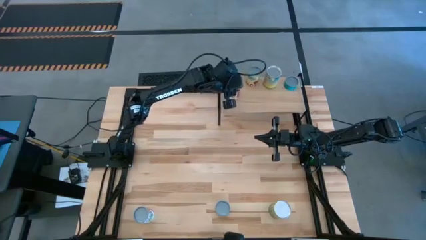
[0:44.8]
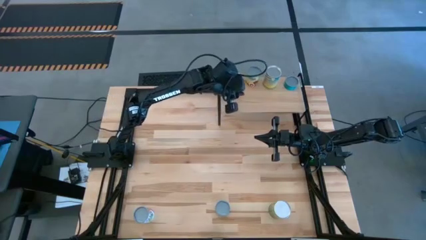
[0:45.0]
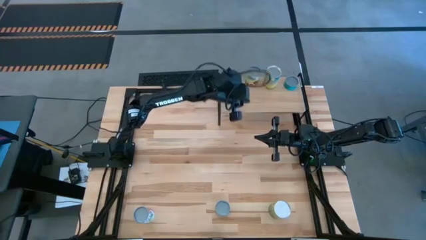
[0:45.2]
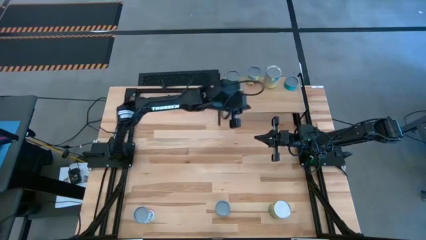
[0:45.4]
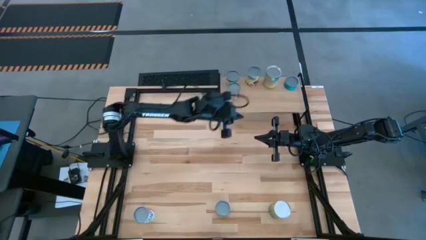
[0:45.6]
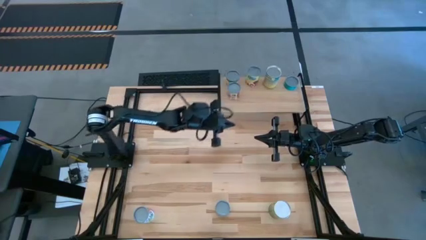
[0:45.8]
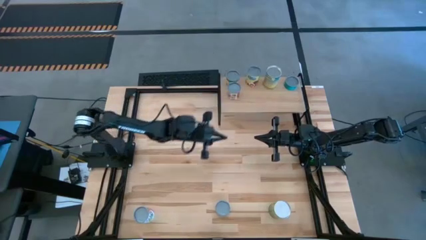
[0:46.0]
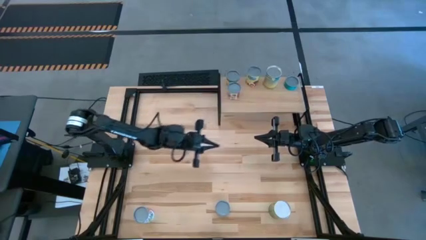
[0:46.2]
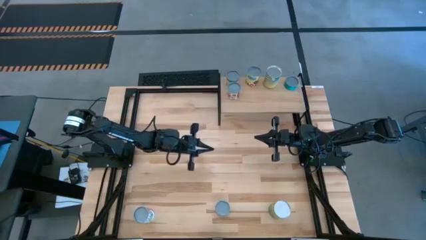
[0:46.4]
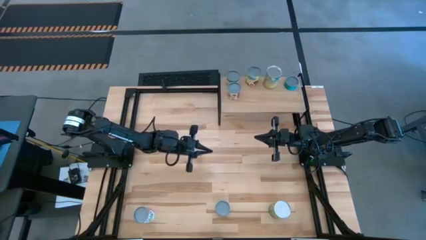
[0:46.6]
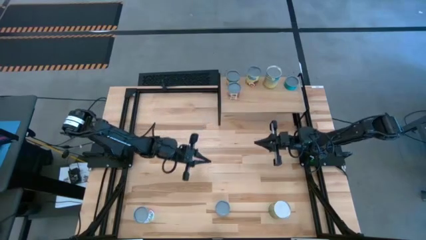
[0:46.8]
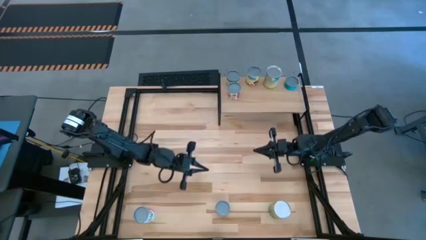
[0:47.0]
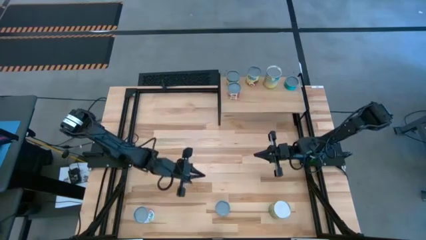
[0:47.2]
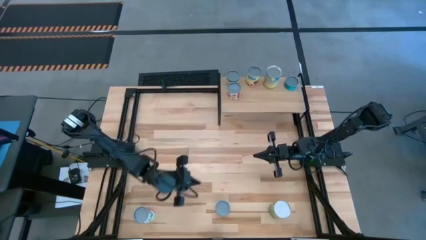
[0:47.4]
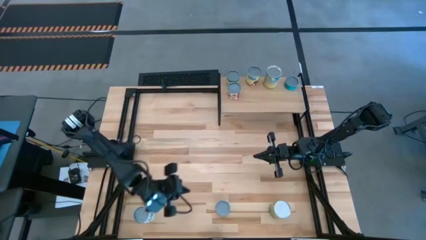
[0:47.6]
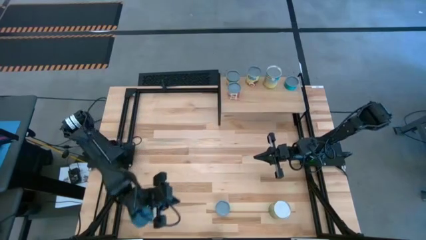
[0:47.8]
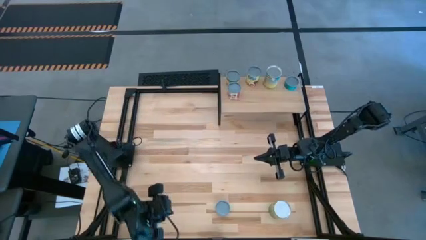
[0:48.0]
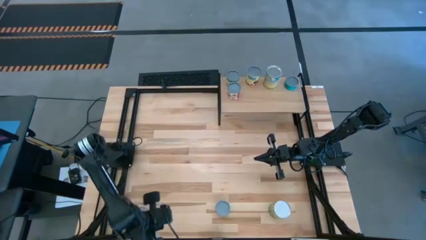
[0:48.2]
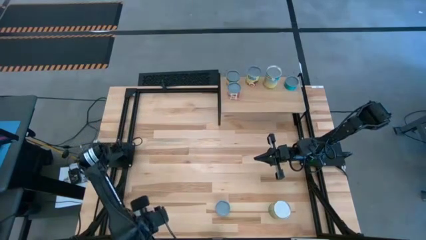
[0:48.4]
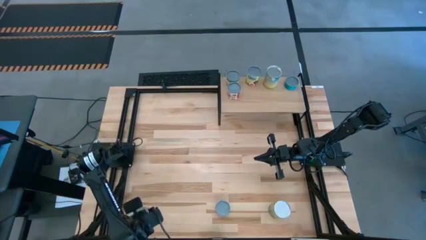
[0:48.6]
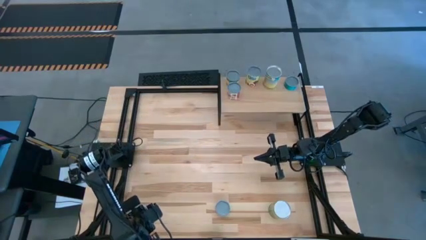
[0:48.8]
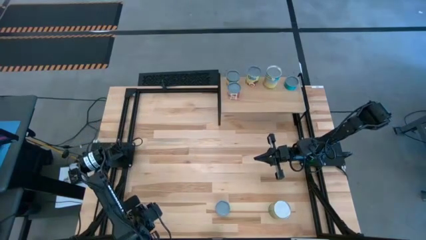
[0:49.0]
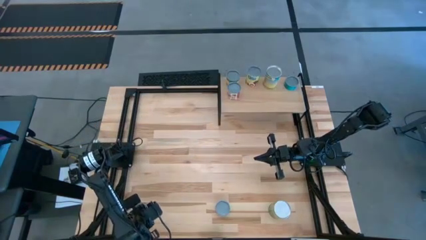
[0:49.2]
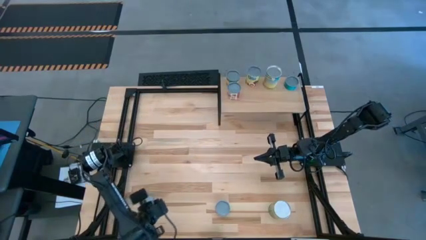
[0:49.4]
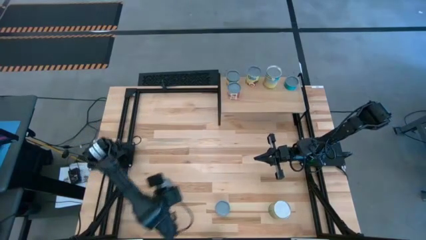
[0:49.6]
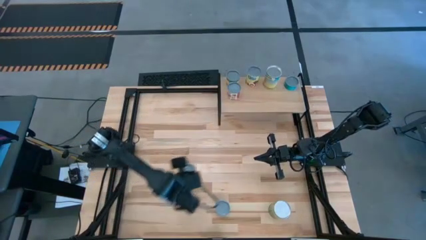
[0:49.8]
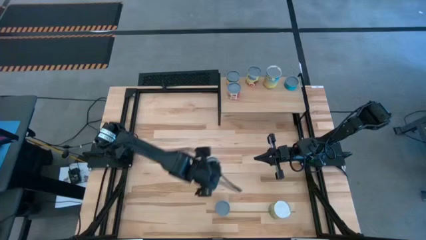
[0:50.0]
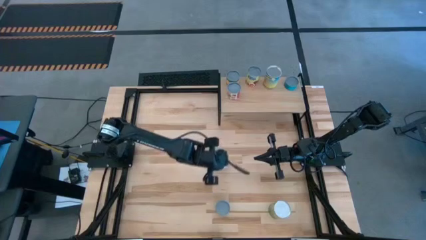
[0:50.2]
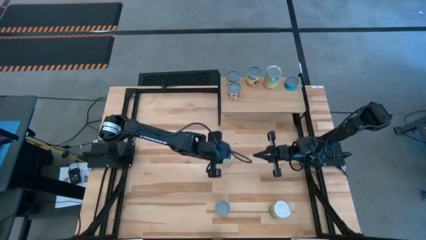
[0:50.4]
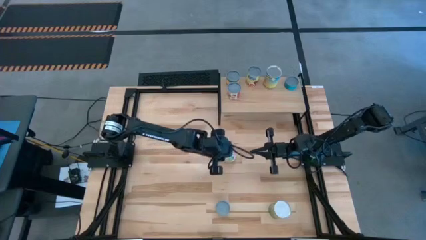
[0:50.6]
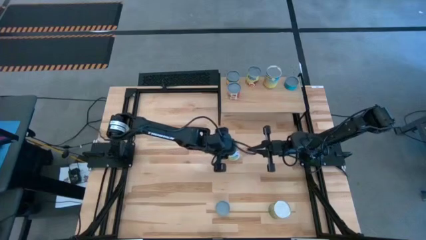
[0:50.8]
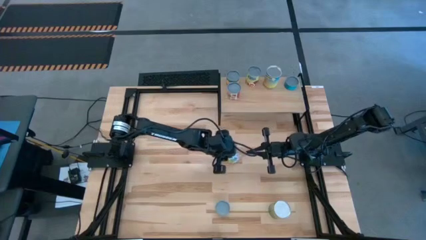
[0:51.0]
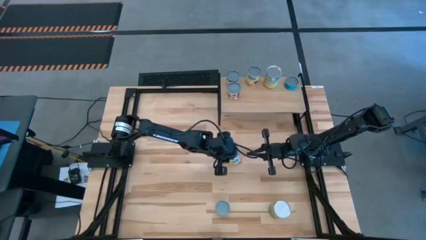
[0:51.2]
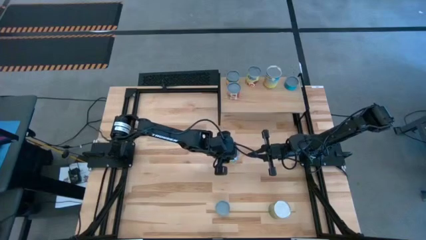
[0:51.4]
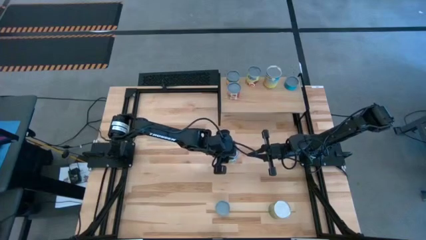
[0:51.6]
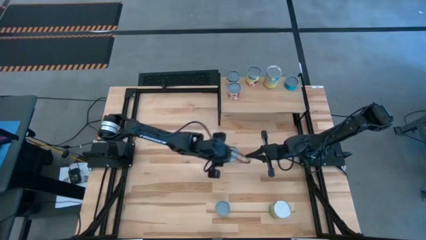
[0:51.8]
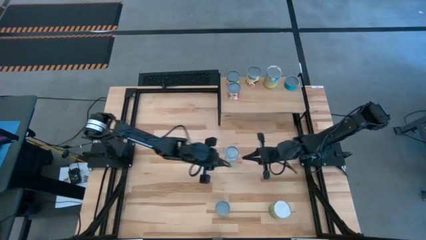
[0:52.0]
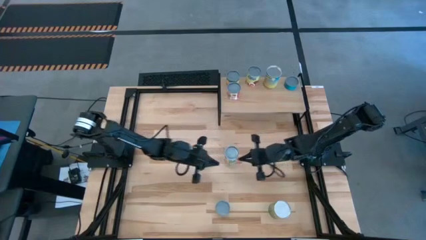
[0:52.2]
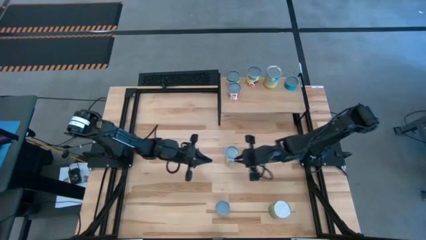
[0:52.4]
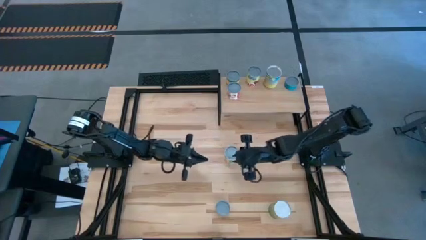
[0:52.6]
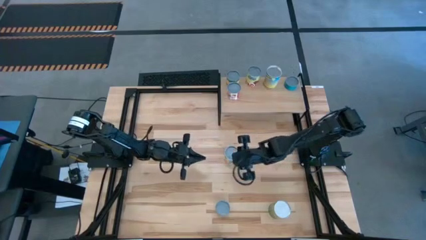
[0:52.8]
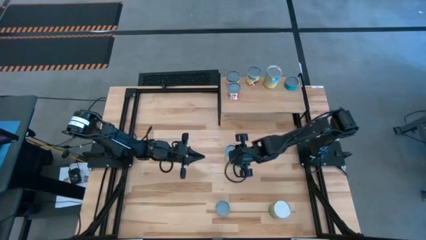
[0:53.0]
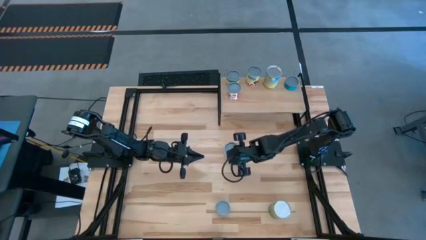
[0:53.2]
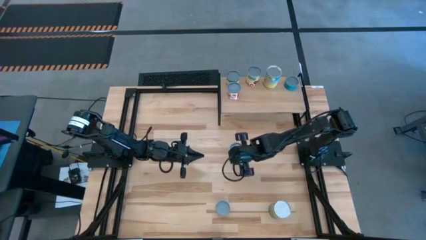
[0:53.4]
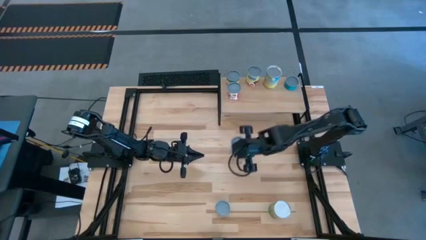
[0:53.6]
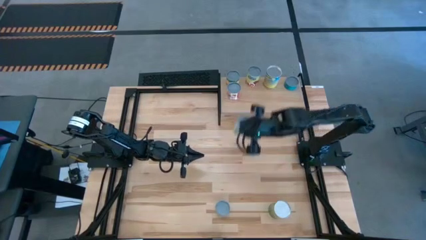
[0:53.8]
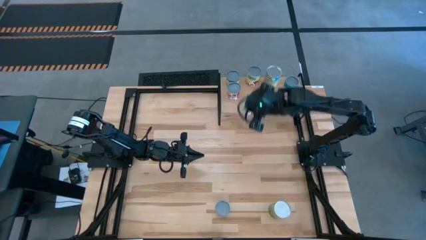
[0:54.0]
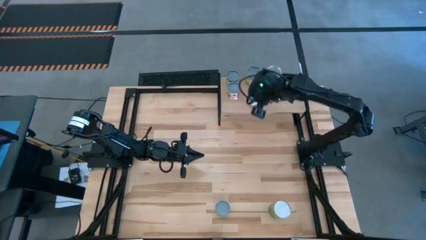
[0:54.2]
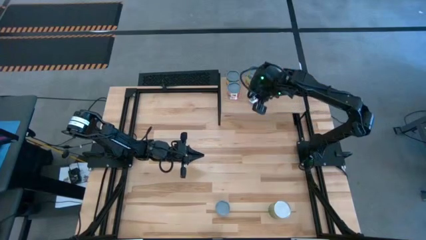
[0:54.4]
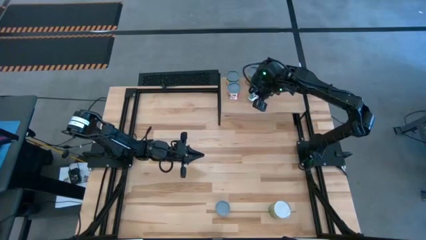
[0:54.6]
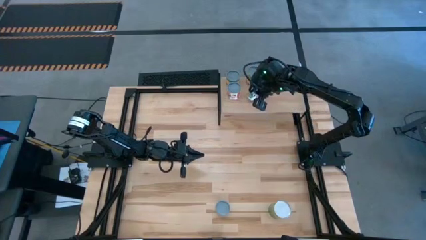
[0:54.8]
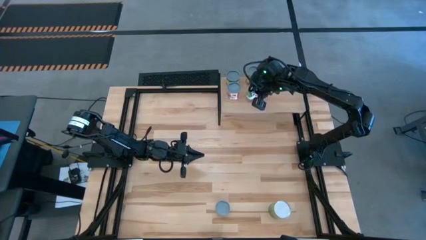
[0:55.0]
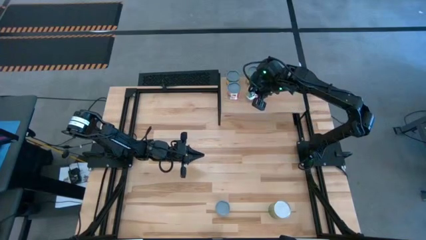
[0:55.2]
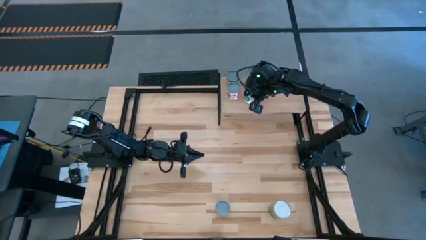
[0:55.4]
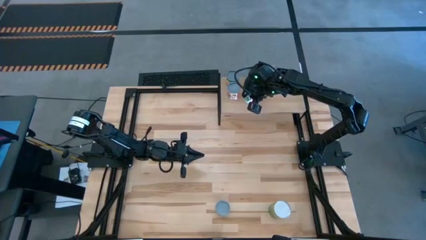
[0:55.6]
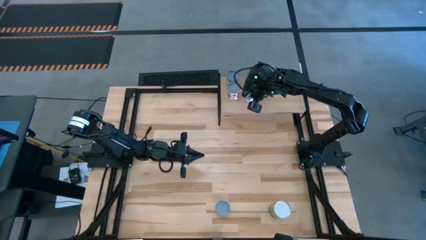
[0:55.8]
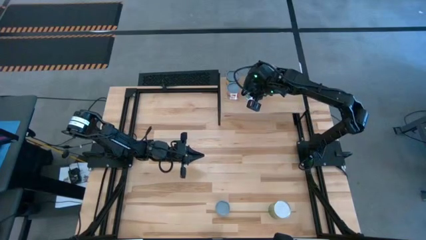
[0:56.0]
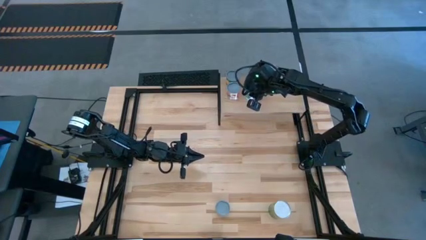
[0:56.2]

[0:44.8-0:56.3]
Task: Pick and place cans onto a shelf
Put the canned mixed fruits on the shelf

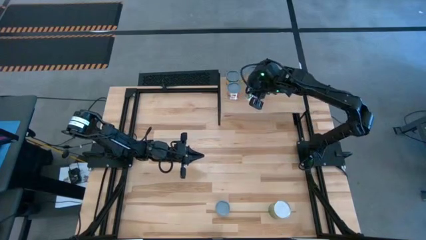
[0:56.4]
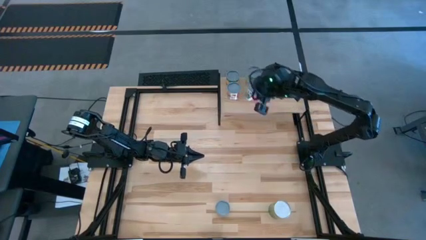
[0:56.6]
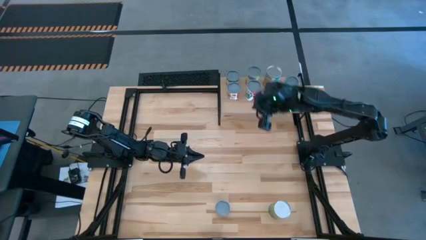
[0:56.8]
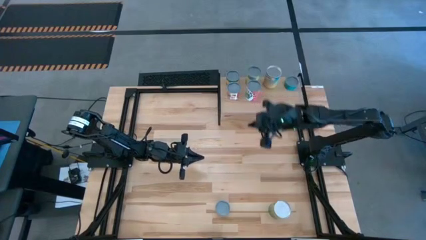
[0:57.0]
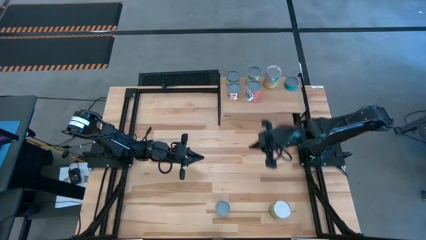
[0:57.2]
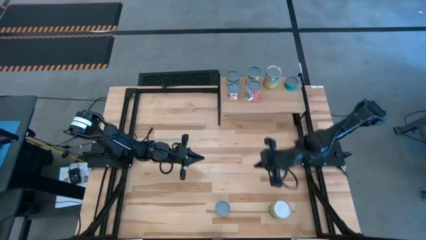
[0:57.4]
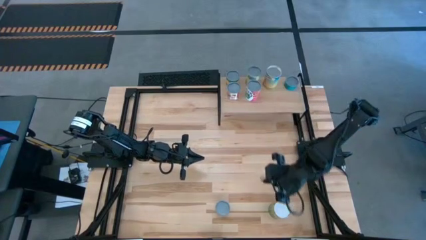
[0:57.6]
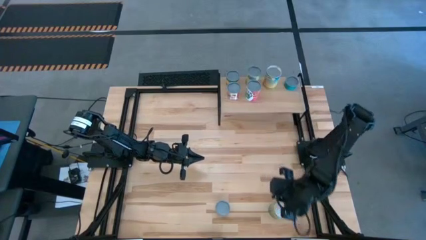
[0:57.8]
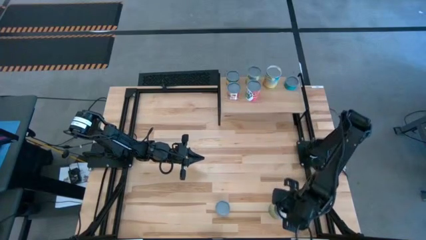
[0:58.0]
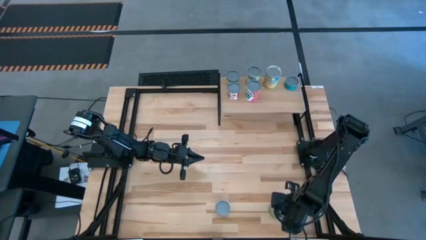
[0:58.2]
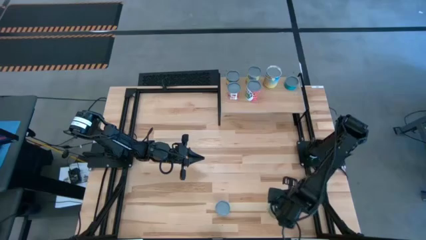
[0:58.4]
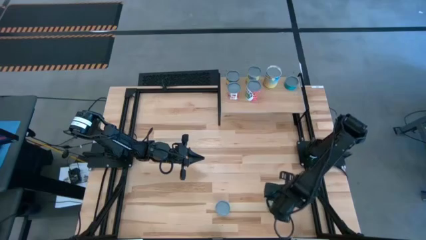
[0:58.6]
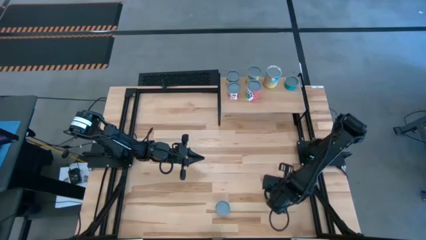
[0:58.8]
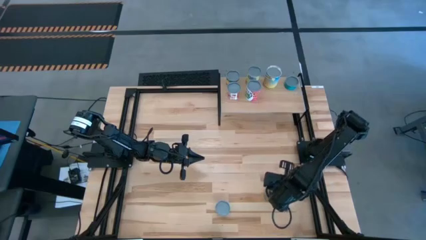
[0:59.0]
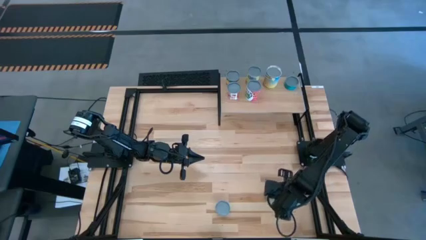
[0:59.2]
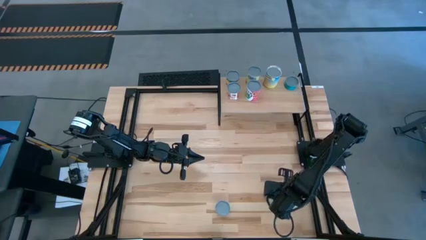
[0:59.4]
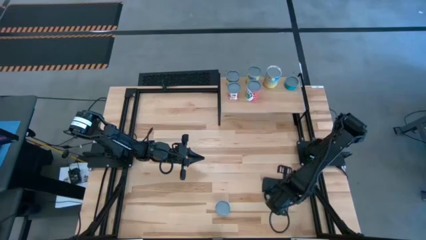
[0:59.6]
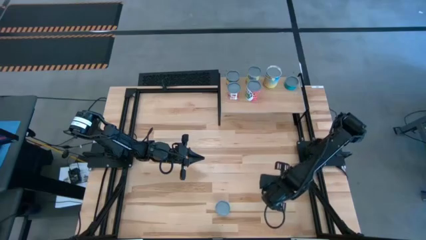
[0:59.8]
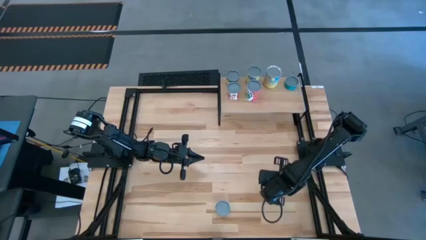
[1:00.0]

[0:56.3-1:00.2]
Put the large canned oranges on the shelf

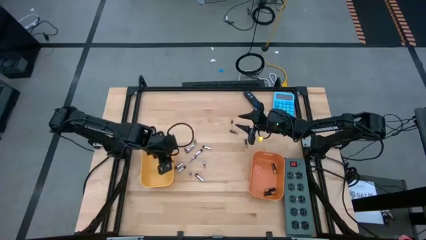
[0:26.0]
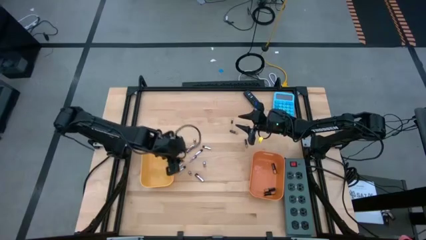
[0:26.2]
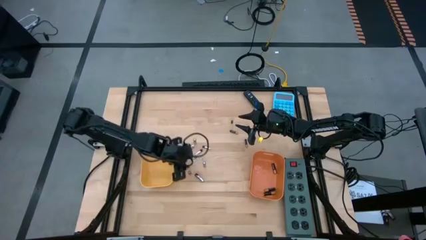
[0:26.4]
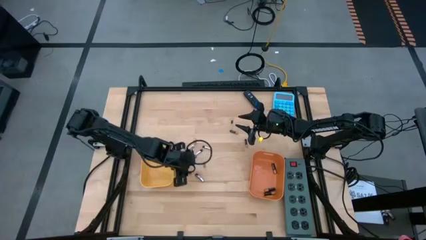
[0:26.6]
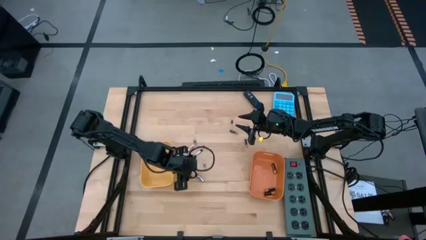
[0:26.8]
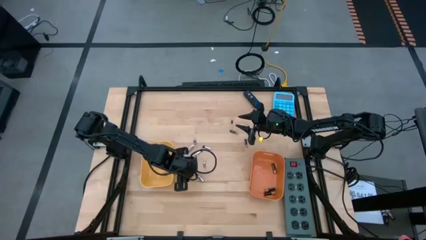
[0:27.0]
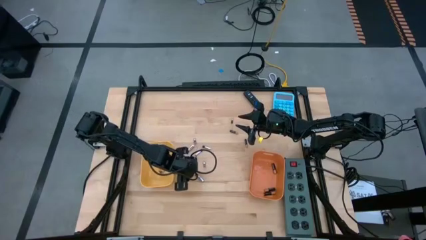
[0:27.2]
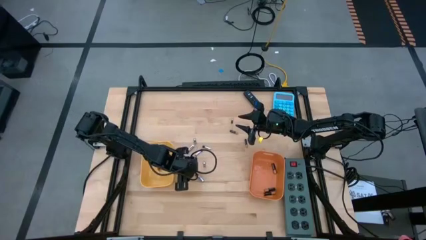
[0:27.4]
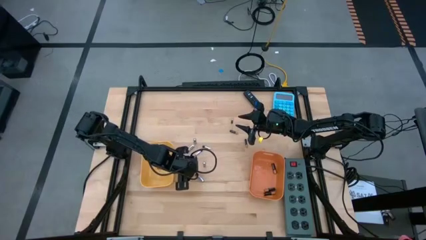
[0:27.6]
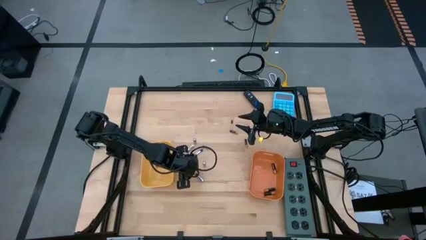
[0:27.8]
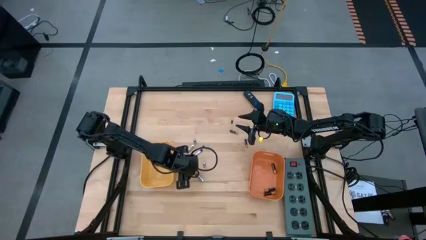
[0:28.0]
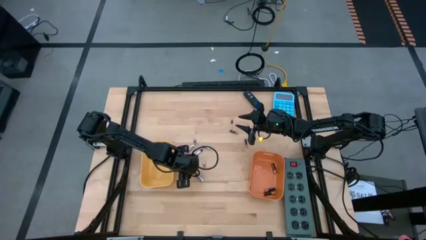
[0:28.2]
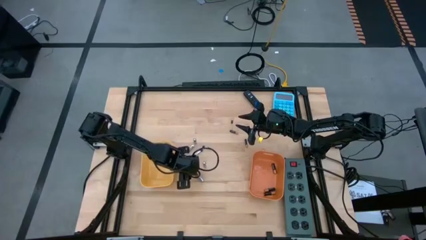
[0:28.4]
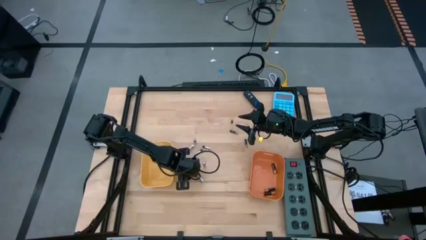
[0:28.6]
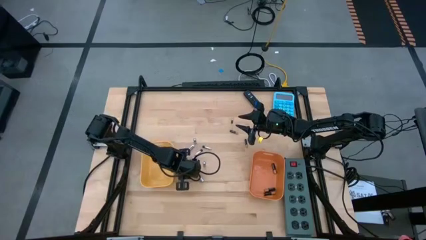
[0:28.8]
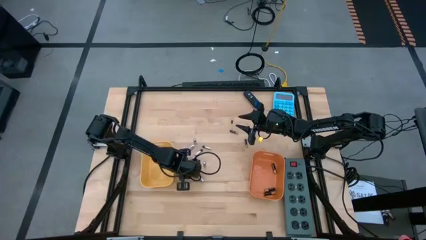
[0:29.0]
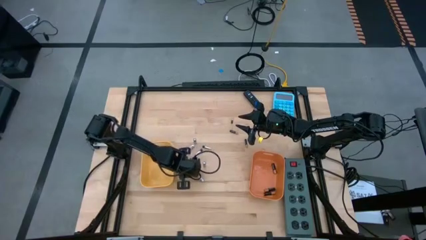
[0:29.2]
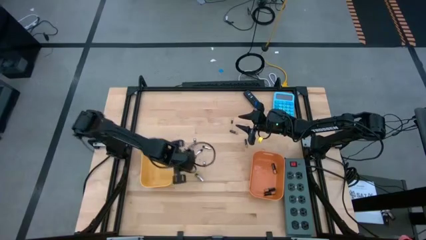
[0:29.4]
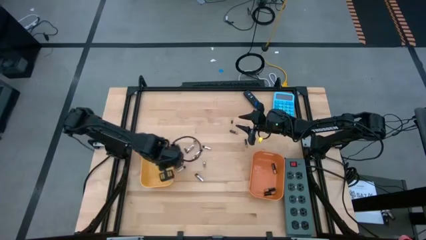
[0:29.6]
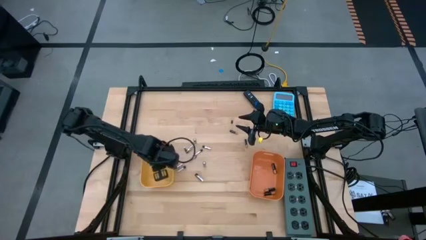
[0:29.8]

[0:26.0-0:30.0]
Task: Sort batteries
Put the silver battery into the yellow bin
